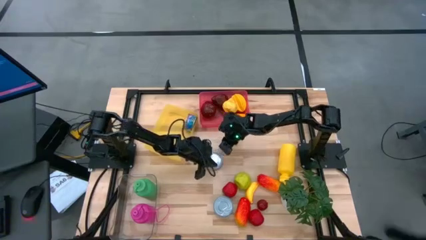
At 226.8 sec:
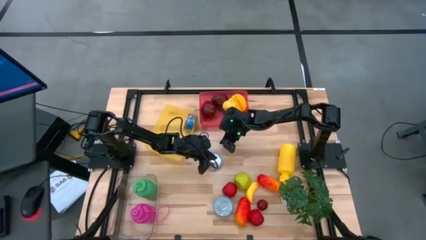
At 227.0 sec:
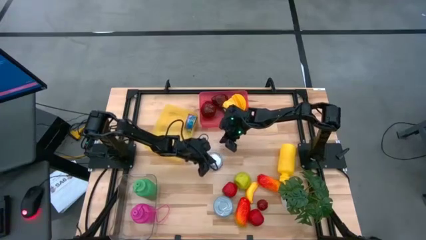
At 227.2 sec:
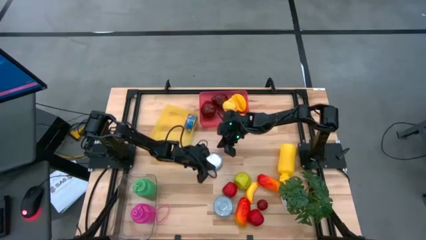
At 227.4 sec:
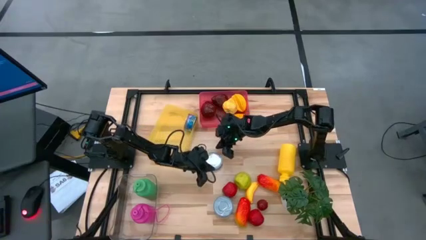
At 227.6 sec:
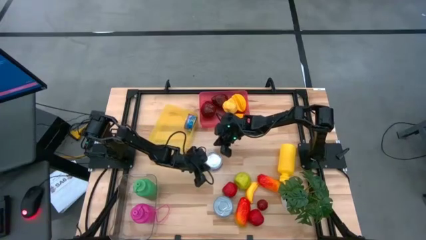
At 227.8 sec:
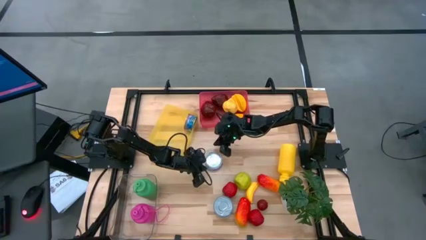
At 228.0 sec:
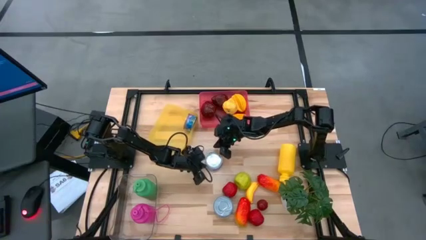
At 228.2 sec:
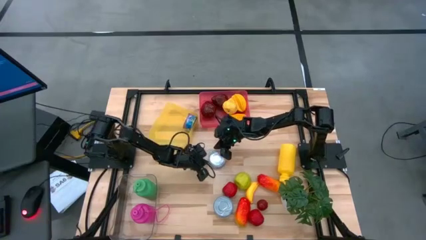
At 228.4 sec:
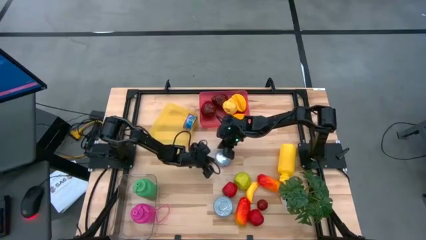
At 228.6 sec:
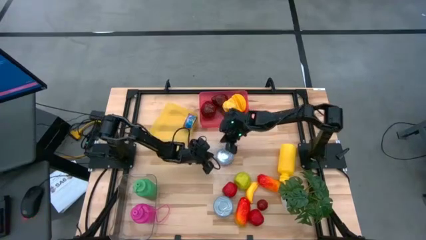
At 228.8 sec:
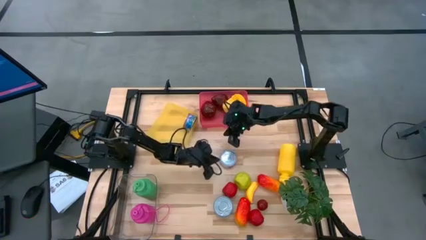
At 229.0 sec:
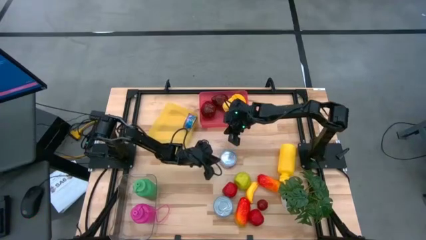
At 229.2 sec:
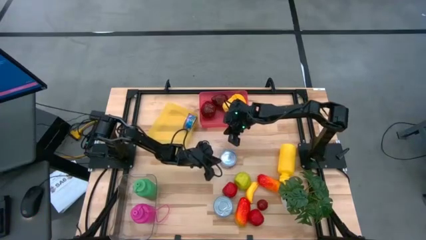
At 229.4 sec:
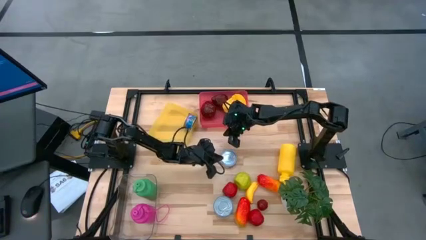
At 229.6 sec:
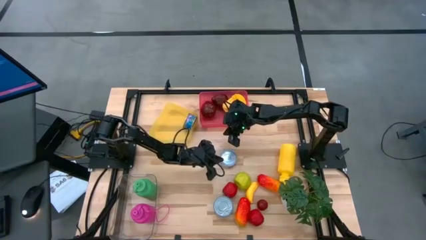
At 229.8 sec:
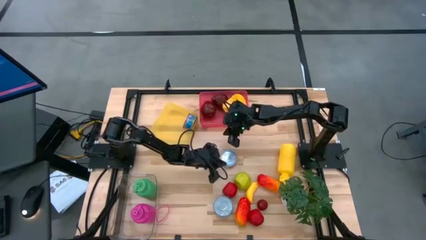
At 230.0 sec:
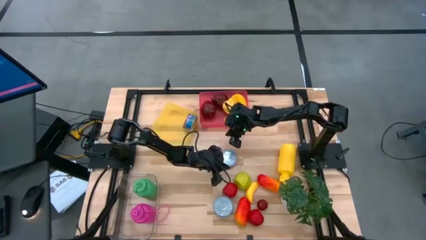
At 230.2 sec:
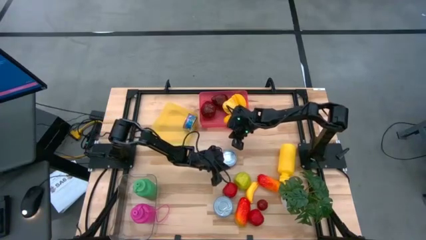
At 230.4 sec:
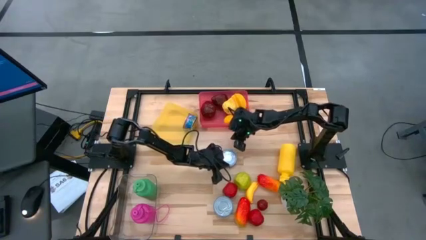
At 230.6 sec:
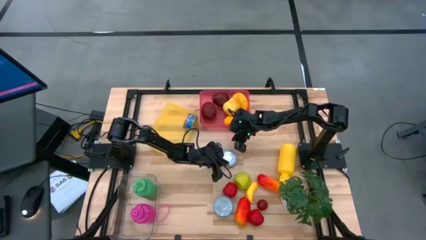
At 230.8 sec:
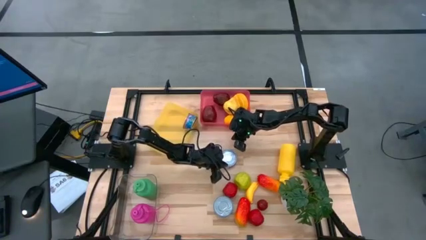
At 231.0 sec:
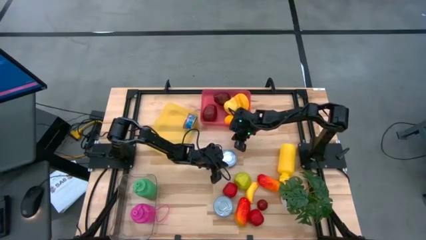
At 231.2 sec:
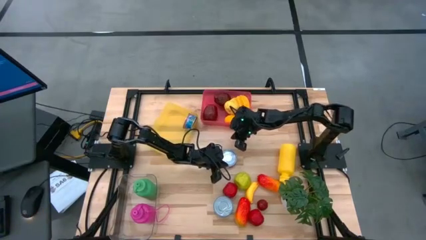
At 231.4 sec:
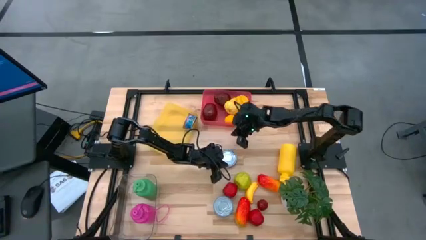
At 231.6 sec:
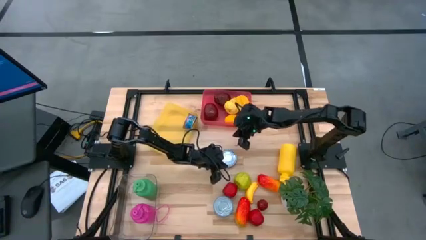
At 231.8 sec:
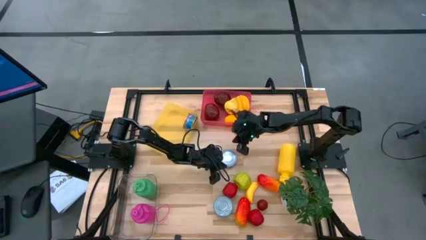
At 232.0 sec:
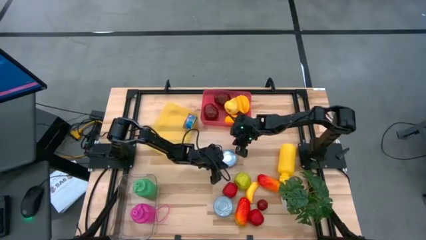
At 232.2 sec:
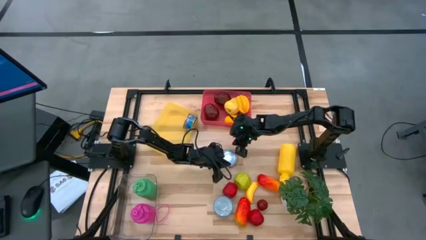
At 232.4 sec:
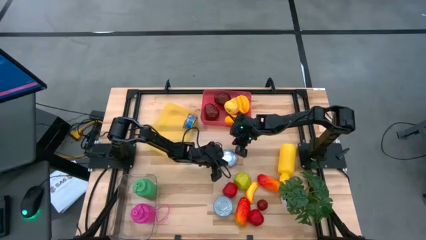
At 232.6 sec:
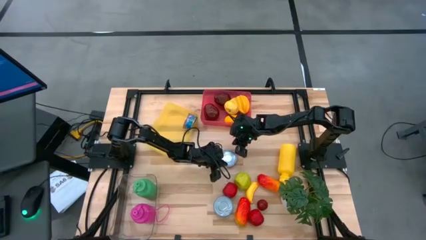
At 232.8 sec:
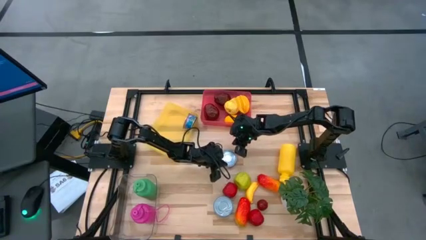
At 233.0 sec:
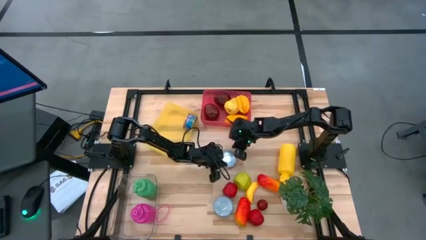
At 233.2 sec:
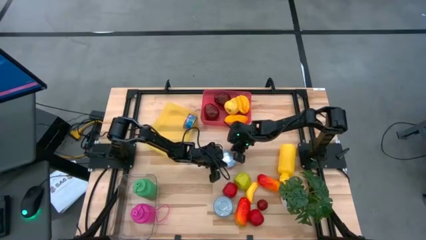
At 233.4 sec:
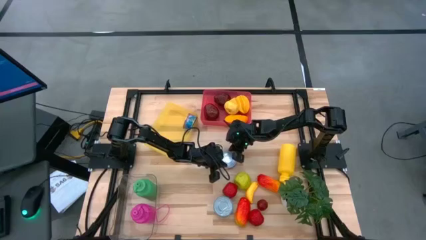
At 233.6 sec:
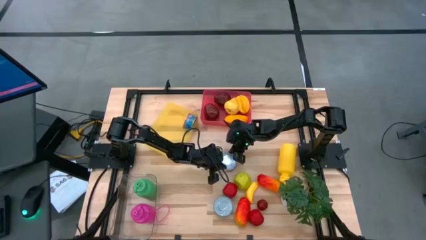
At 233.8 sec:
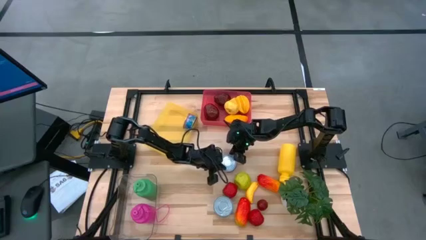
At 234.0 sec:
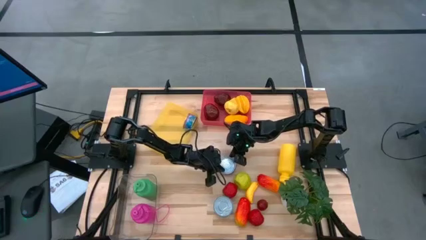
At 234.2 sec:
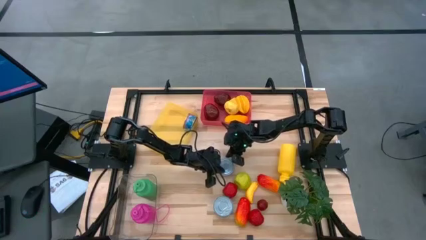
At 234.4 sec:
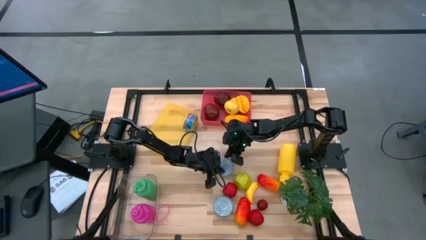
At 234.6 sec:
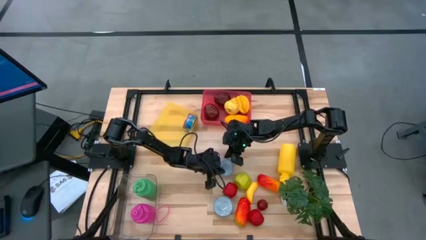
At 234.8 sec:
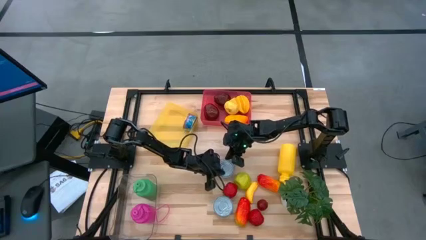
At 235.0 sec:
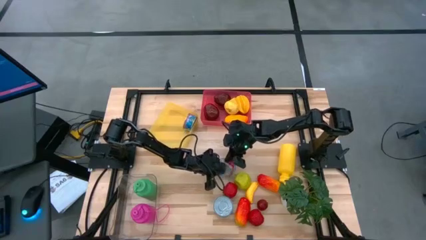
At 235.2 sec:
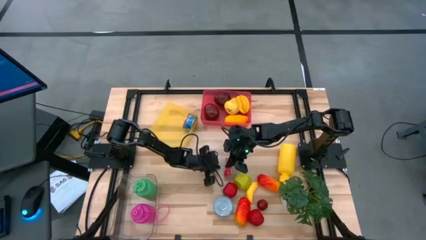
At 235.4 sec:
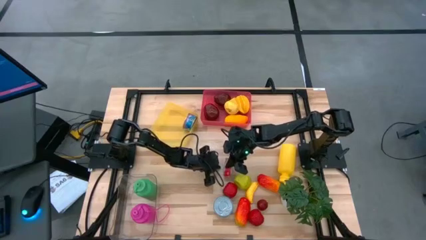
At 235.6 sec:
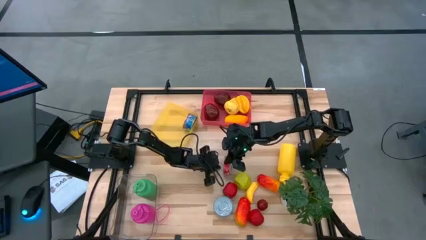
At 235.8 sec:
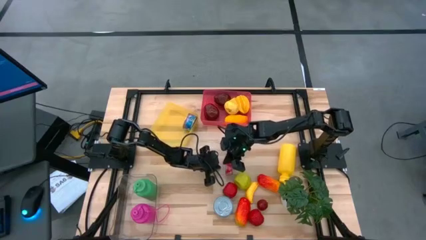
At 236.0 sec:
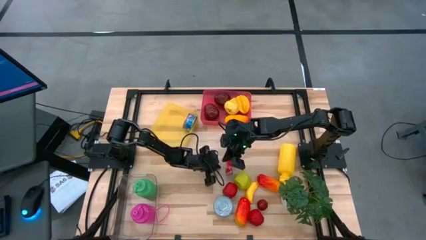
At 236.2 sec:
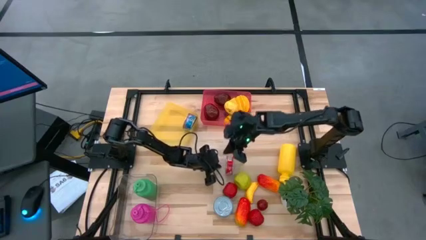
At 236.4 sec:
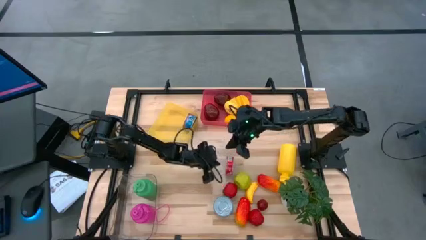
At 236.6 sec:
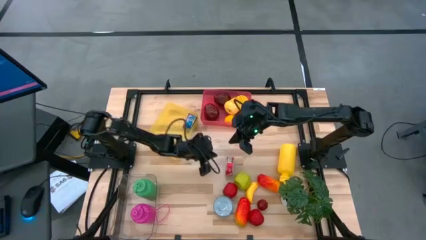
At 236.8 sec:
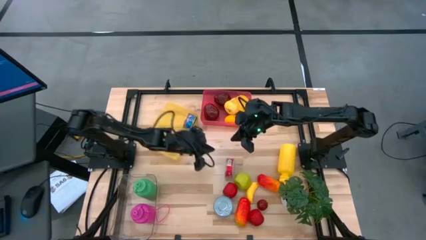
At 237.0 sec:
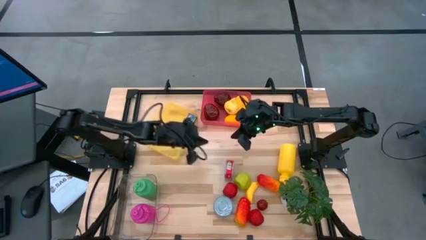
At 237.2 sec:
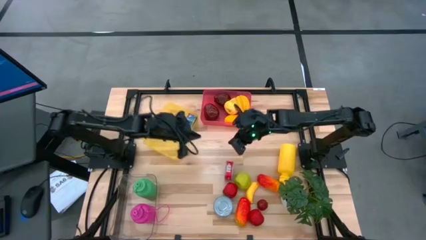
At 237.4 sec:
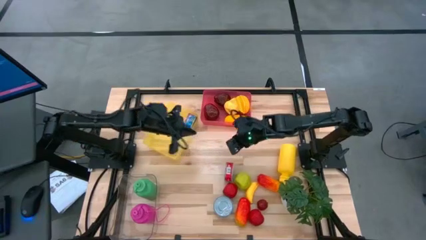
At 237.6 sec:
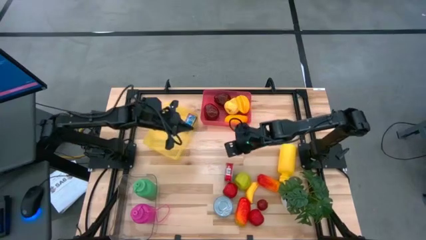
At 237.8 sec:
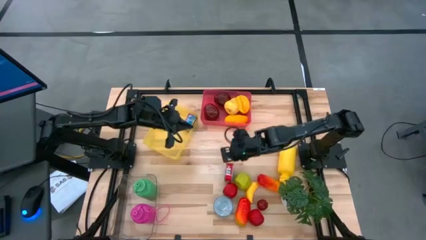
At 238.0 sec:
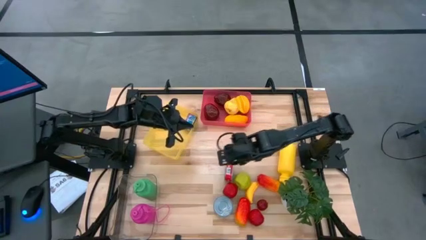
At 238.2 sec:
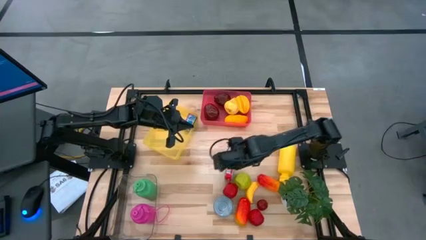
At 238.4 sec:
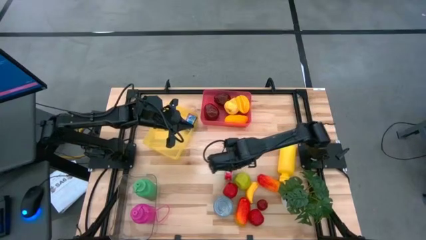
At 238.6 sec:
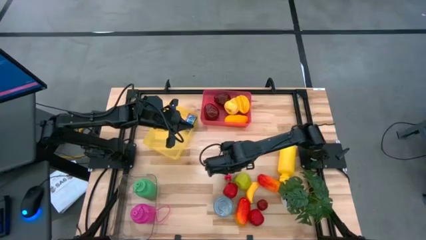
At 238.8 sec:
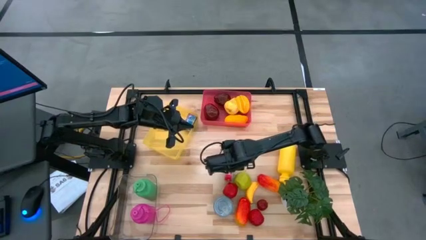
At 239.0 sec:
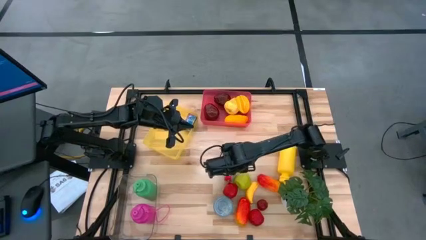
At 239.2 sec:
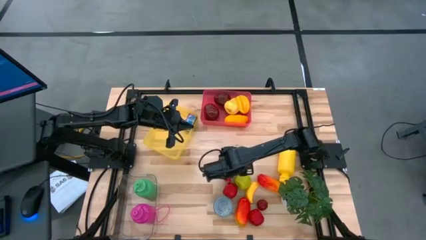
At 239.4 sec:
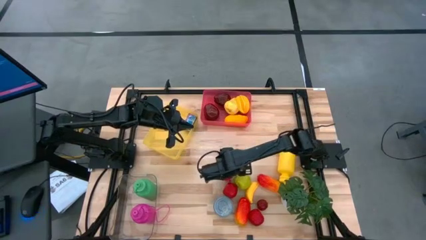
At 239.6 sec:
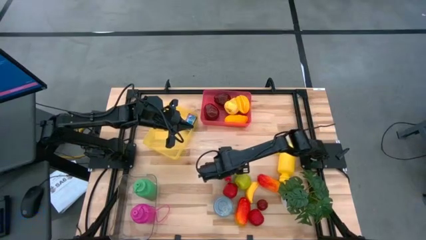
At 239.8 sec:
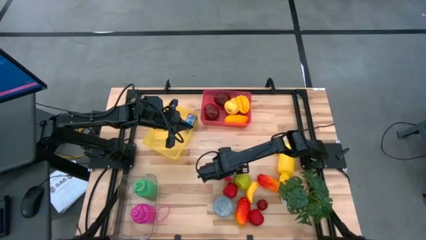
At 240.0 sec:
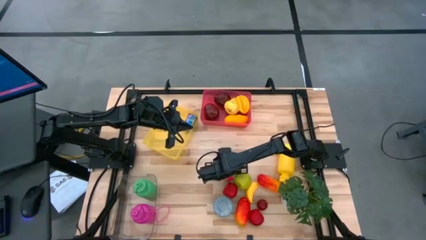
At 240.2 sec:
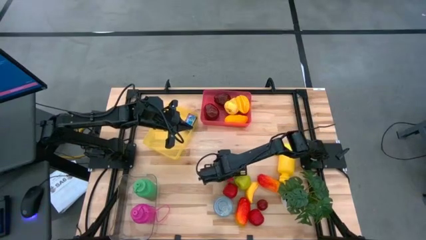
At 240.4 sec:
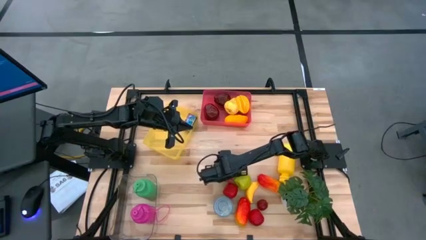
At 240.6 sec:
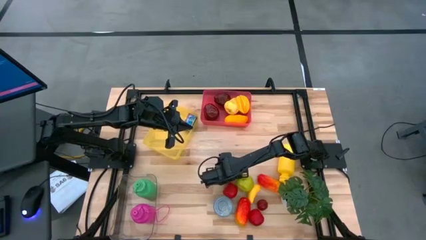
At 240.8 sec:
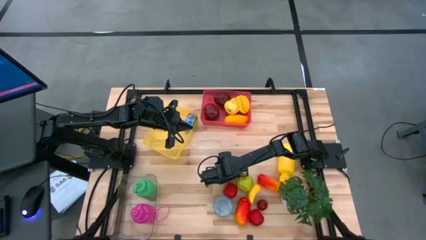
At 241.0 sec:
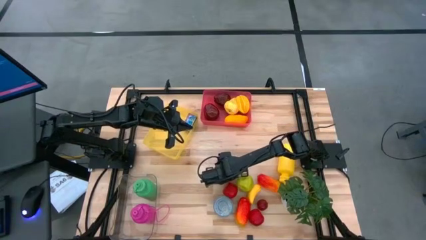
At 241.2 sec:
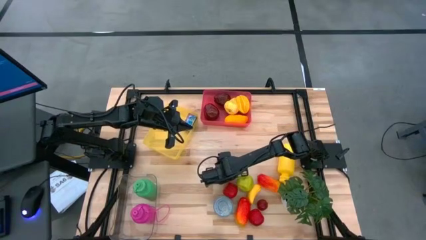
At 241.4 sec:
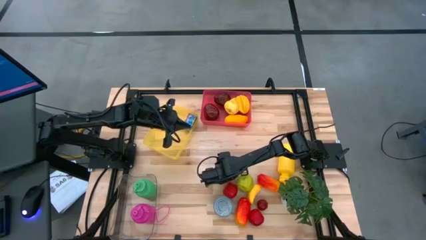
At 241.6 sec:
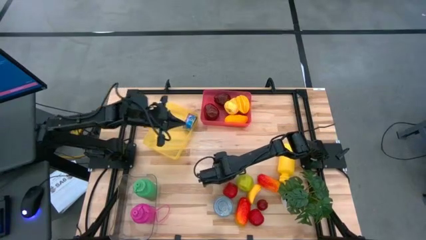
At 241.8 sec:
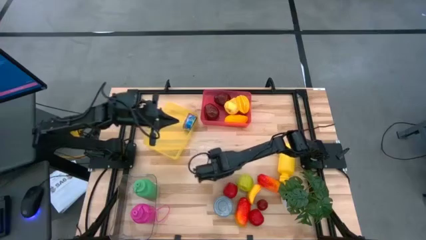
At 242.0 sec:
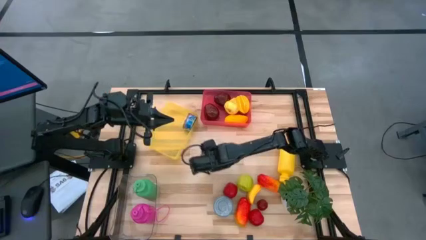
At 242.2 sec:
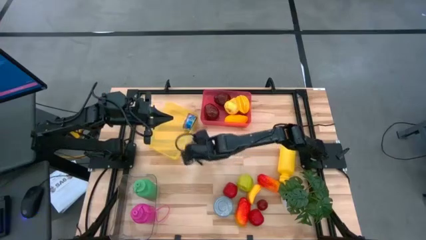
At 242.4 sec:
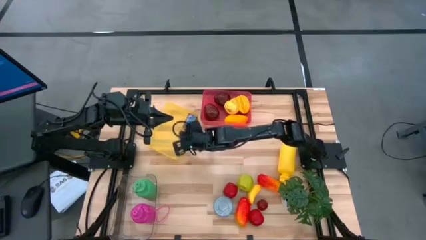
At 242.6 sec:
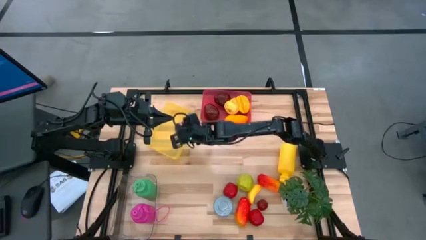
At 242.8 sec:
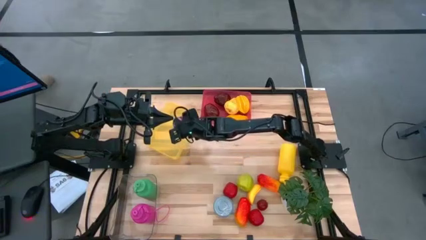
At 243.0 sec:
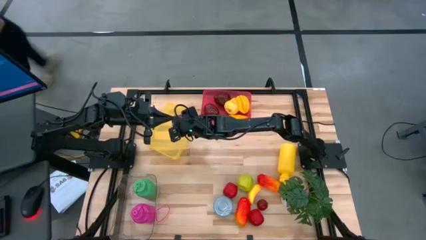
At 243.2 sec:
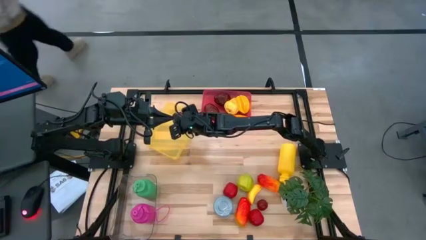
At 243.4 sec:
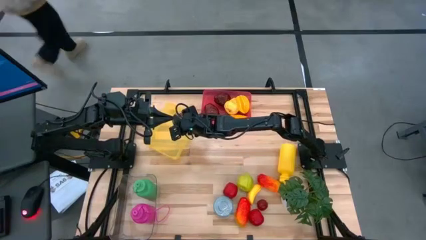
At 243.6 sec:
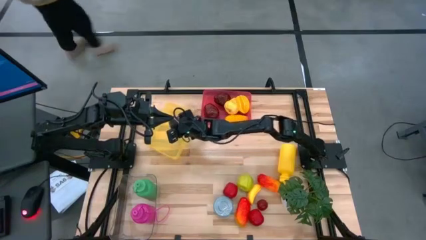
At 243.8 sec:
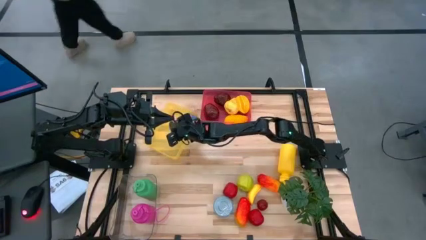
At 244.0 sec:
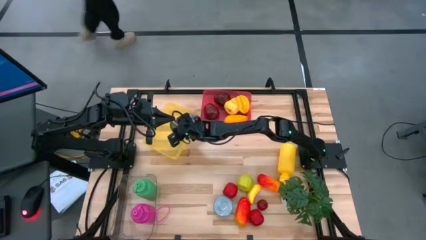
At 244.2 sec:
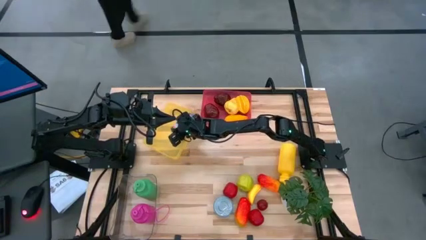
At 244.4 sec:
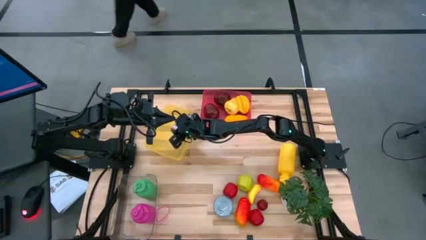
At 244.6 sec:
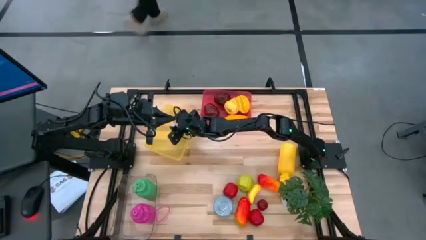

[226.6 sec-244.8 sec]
Task: Pick & Place Food Item
Put the red tuna can into the yellow bin
